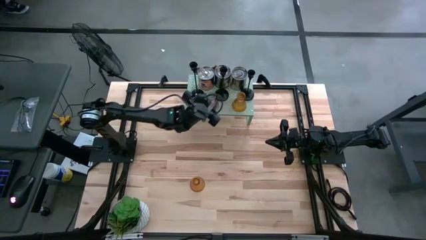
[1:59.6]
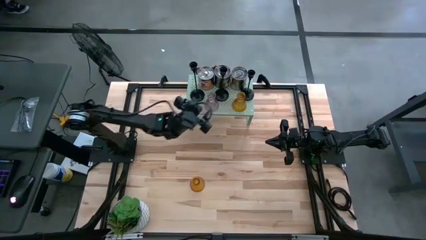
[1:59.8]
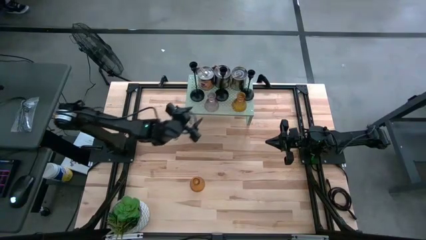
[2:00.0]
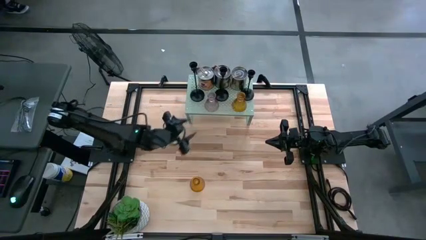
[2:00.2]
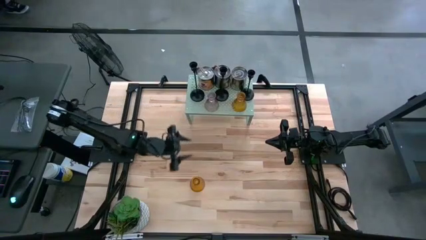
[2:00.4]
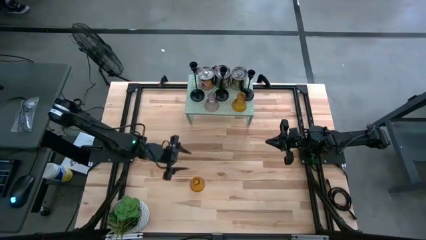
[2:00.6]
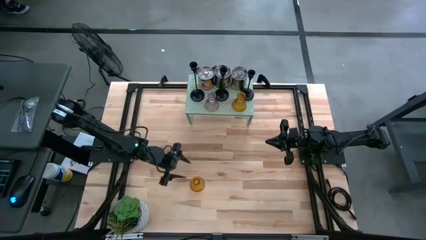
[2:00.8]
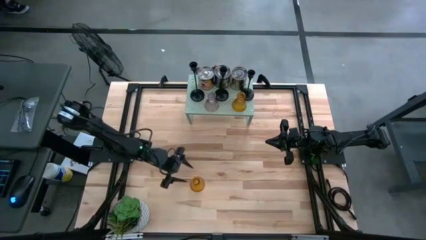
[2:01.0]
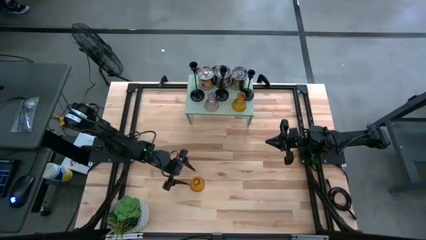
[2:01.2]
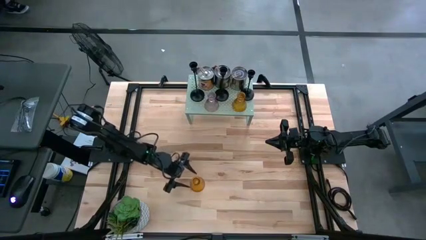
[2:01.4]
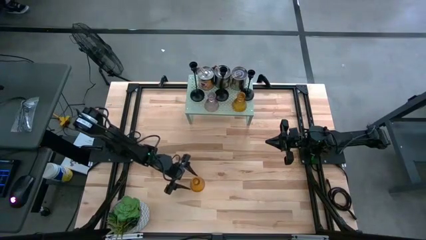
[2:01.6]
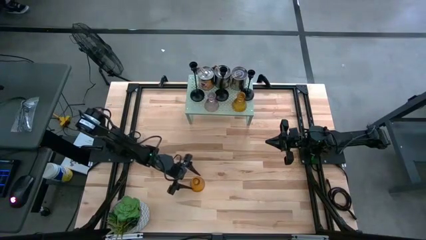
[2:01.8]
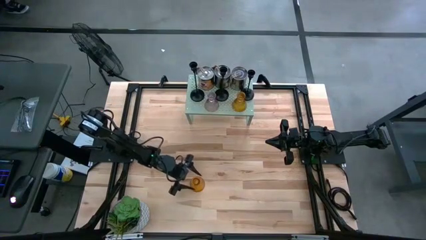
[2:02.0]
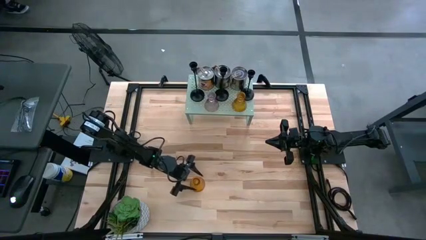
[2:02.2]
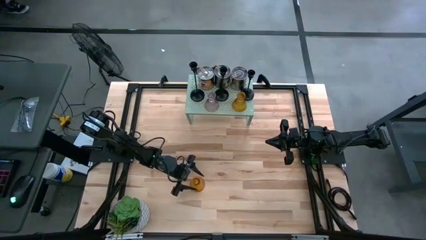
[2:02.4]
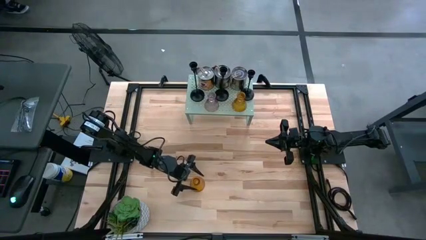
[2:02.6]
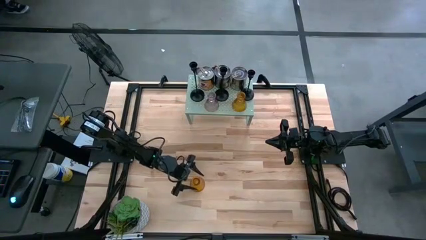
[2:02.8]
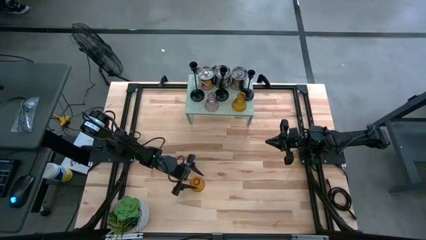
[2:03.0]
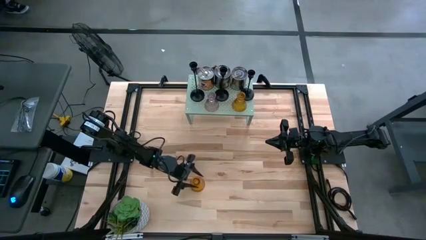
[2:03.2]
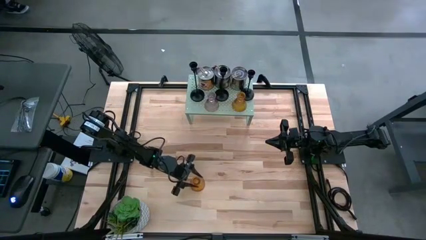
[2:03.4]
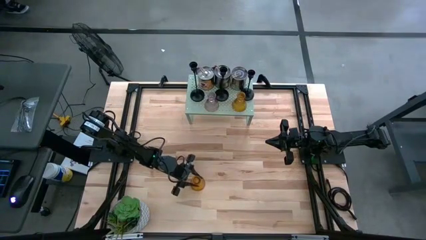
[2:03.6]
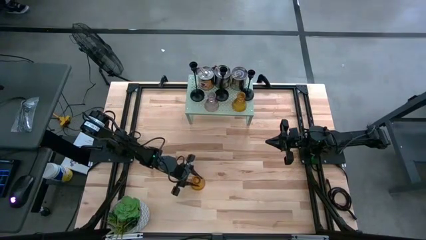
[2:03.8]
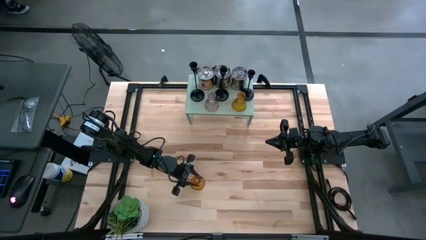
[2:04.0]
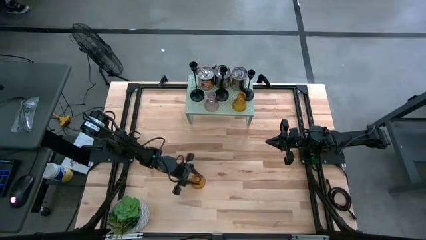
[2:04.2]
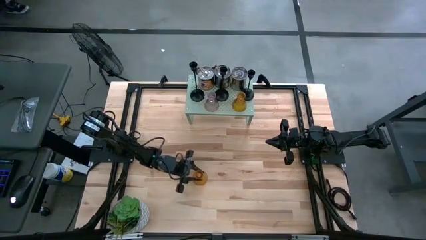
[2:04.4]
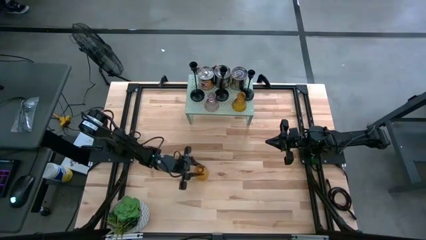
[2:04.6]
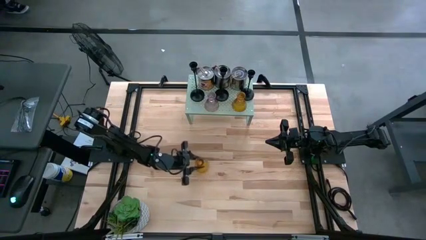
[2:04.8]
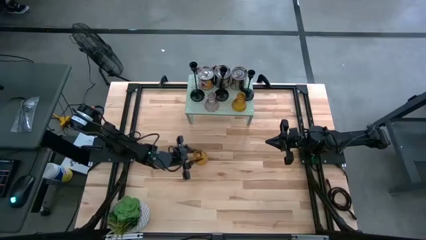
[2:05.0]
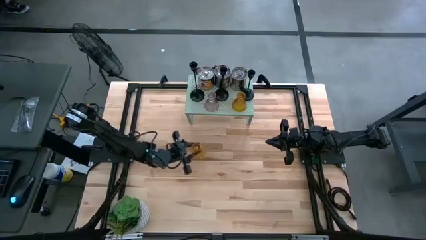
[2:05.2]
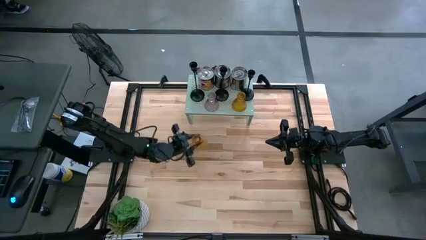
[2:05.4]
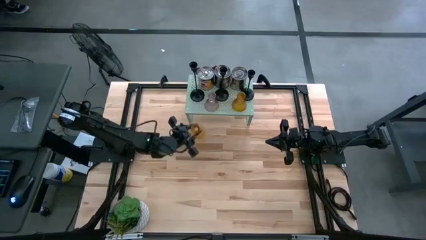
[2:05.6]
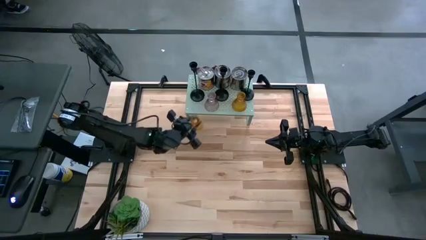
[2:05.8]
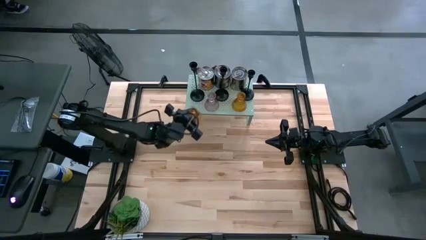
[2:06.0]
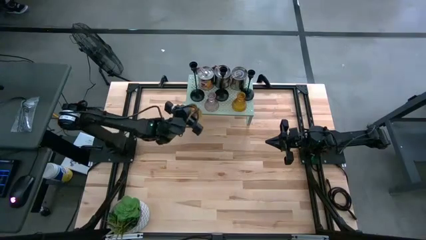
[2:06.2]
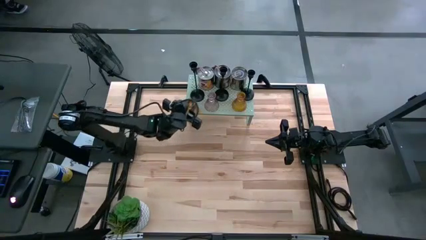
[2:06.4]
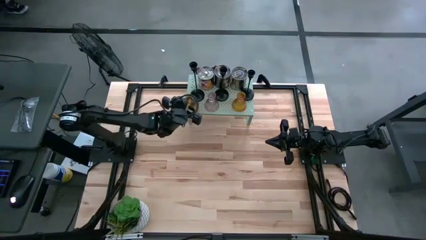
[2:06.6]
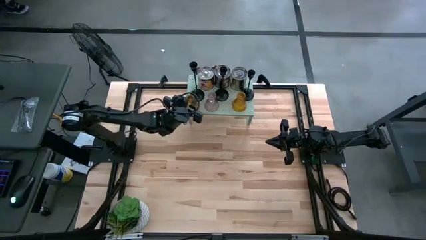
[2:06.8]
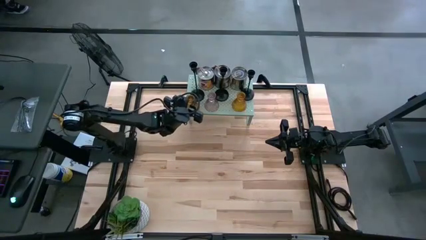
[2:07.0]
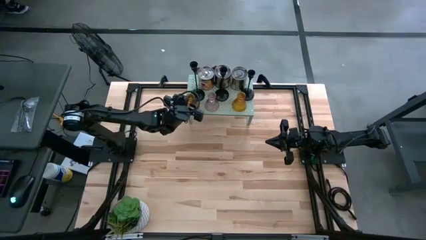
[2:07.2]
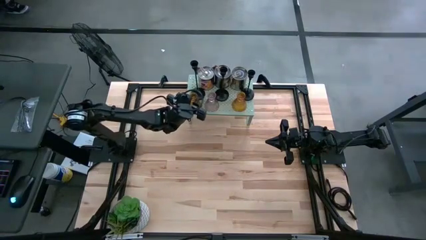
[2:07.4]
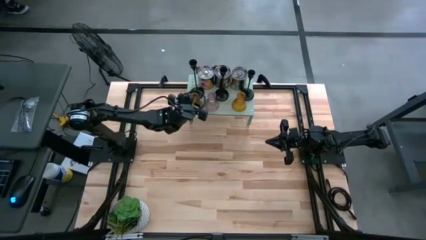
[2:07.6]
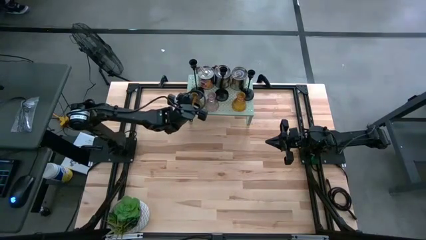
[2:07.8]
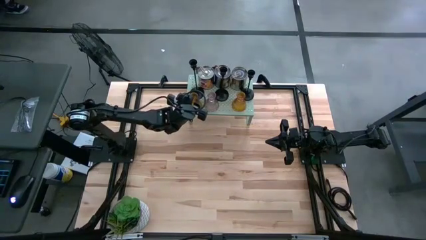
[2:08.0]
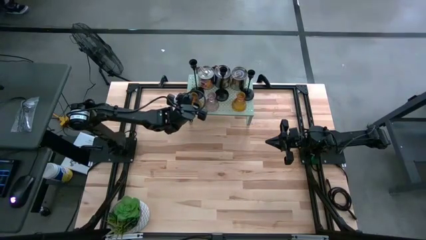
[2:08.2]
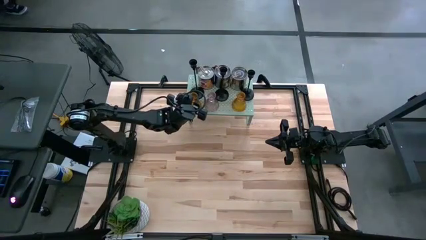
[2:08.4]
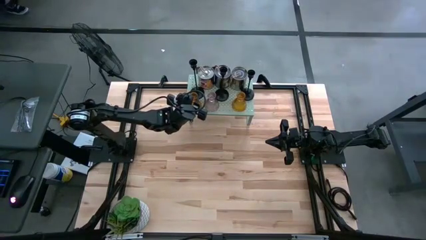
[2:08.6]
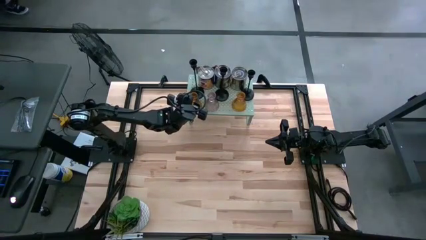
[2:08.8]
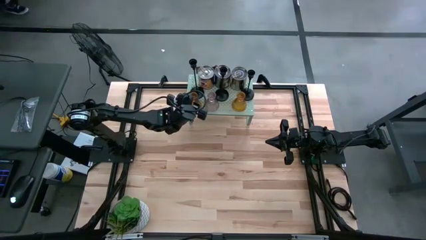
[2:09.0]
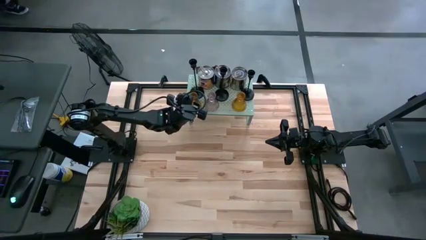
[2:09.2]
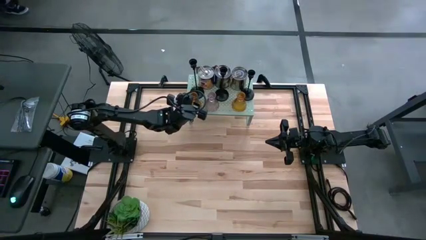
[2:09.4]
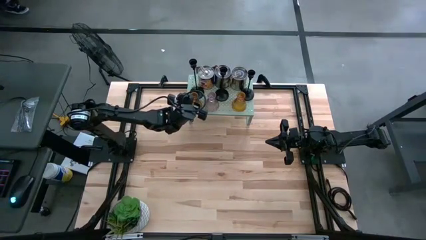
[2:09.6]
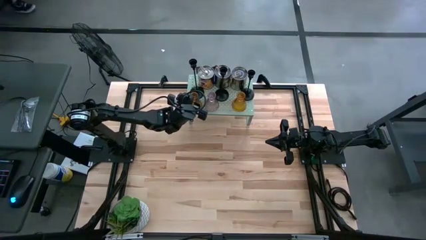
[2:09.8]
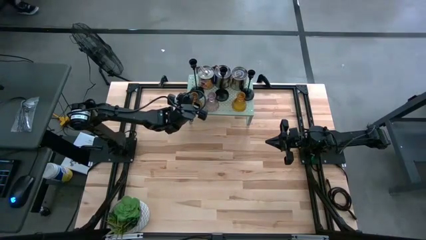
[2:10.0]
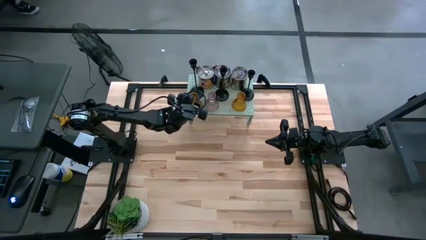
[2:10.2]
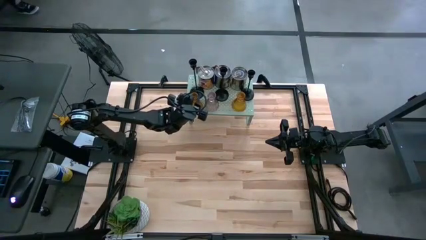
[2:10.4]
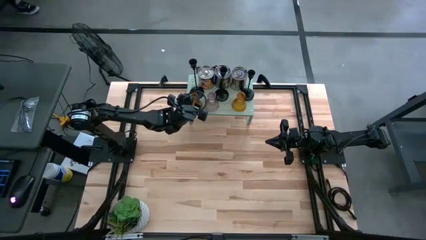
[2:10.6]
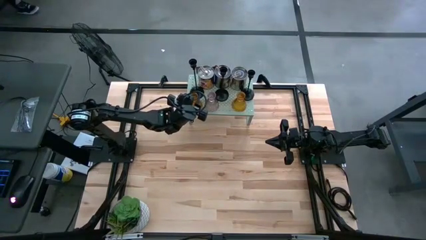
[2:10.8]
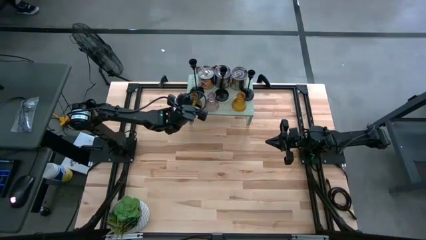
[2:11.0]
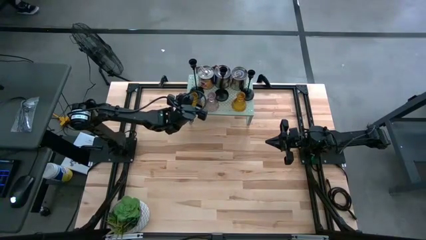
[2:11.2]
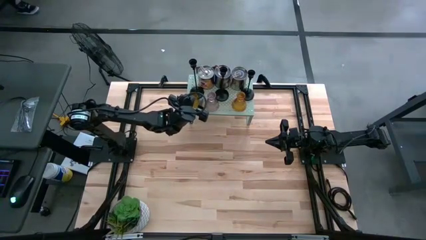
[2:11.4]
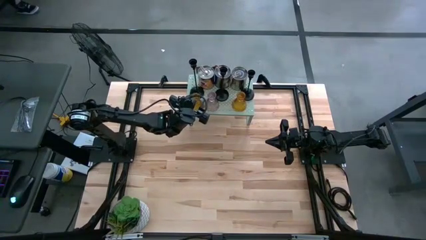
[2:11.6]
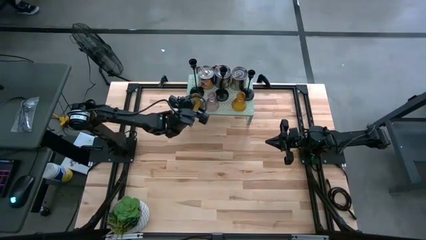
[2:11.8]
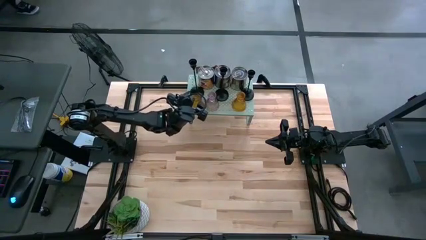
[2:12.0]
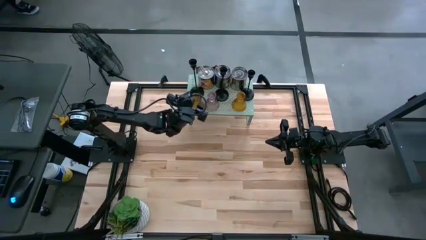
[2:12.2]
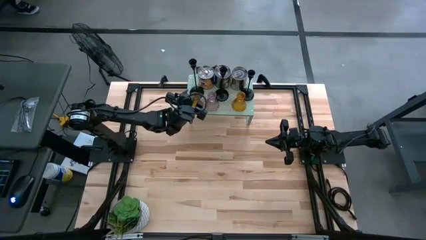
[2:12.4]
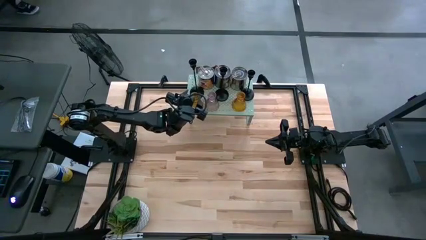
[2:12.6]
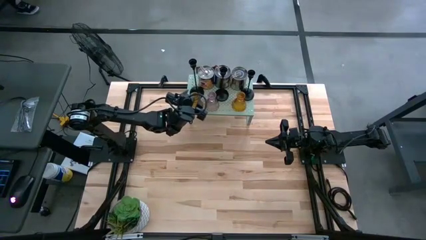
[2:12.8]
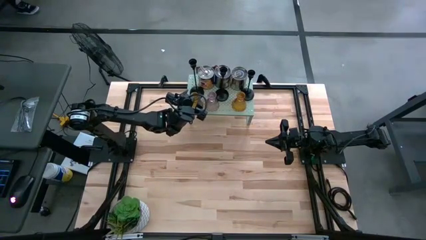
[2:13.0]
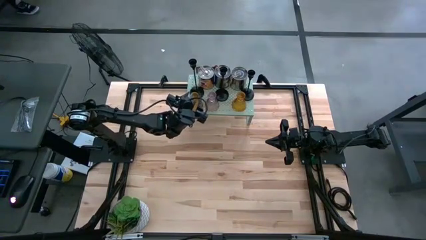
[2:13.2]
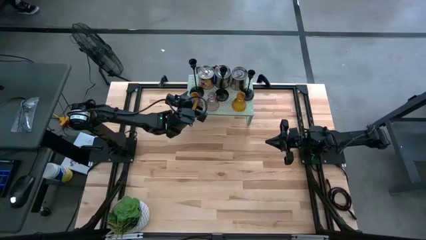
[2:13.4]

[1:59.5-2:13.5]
Task: Pick & Place candle stick holders
Put the yellow candle holder on the shelf

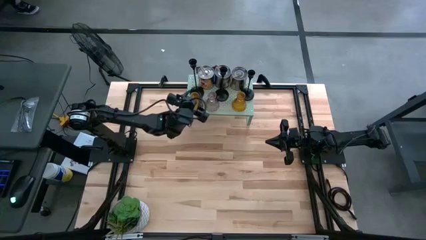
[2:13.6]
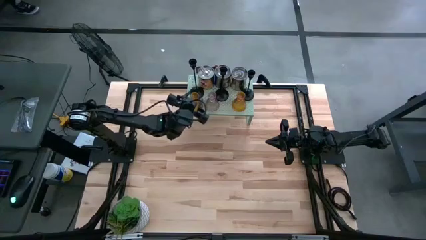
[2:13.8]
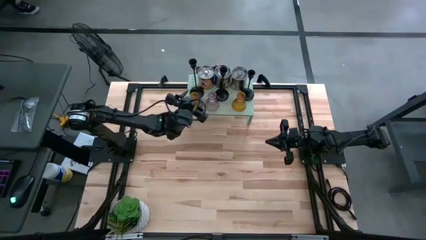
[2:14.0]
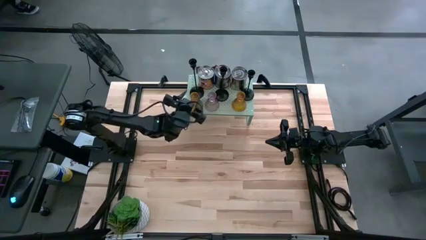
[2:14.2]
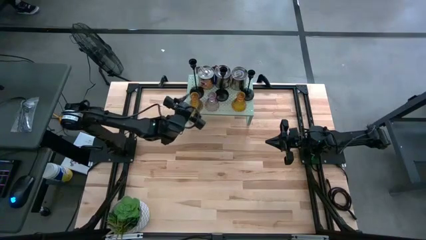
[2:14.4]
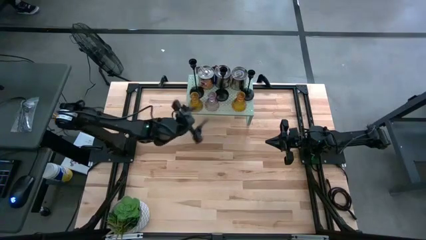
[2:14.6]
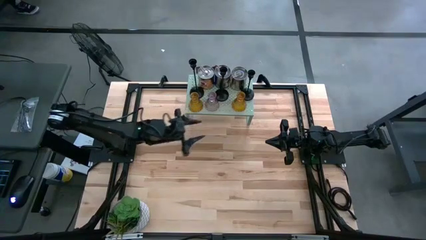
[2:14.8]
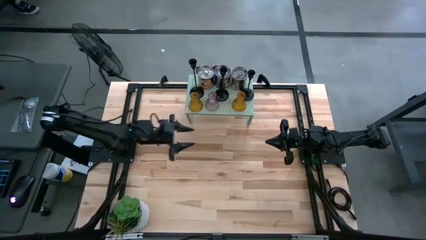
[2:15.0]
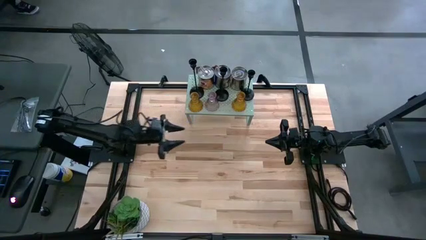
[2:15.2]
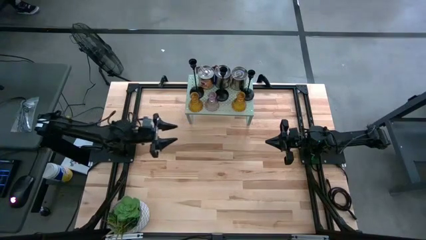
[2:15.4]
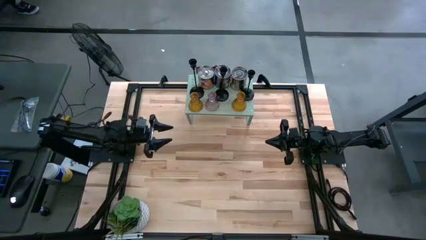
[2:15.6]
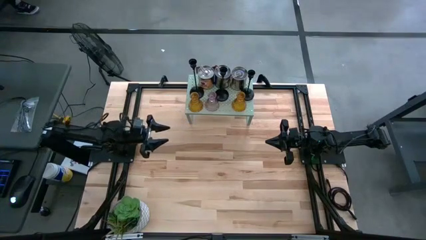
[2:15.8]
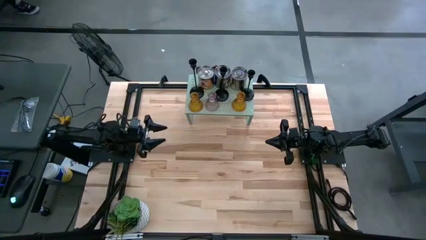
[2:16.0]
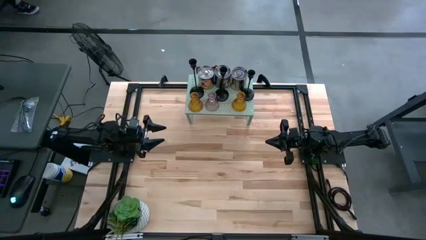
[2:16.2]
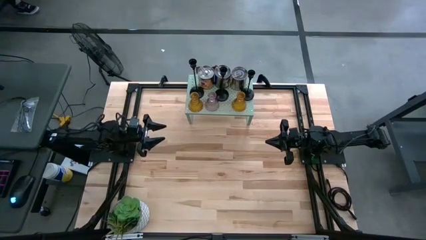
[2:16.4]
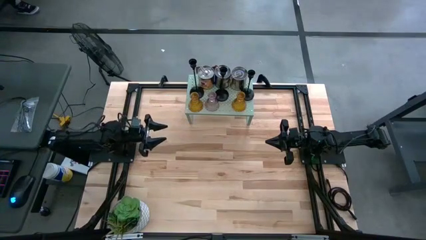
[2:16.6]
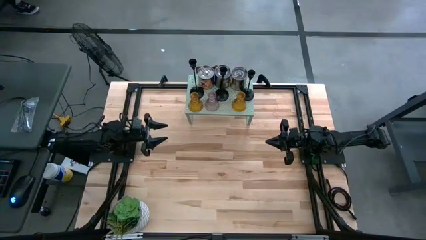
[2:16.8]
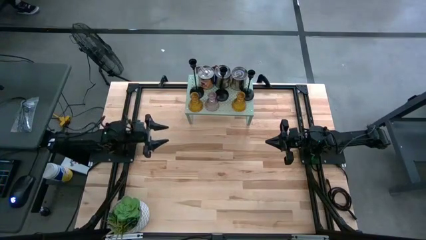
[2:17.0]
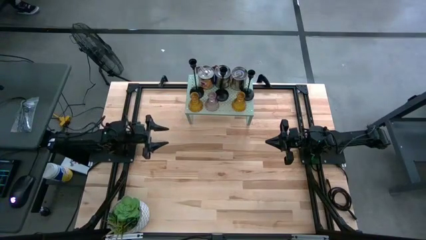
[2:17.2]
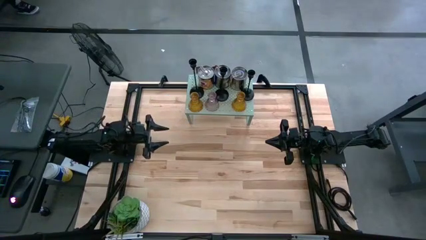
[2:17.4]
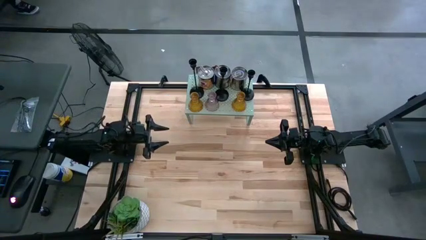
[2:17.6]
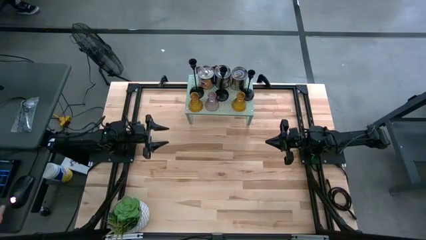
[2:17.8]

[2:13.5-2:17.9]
Return to Home Position
